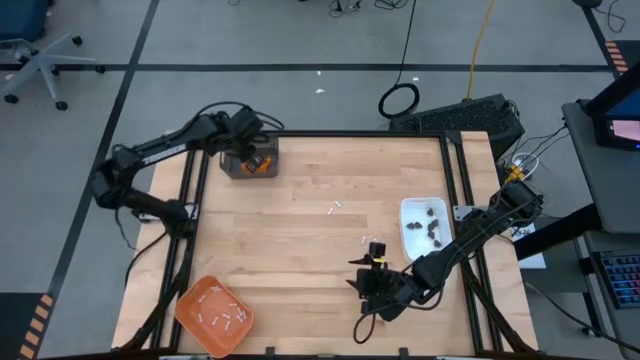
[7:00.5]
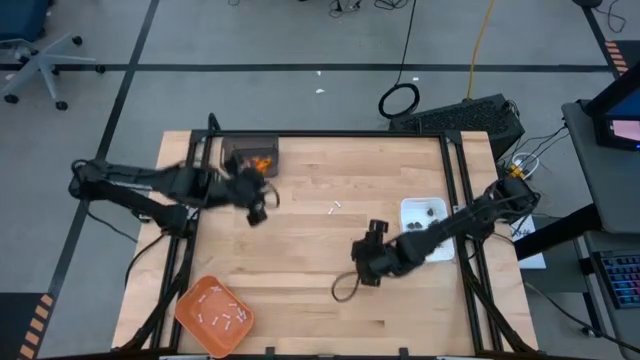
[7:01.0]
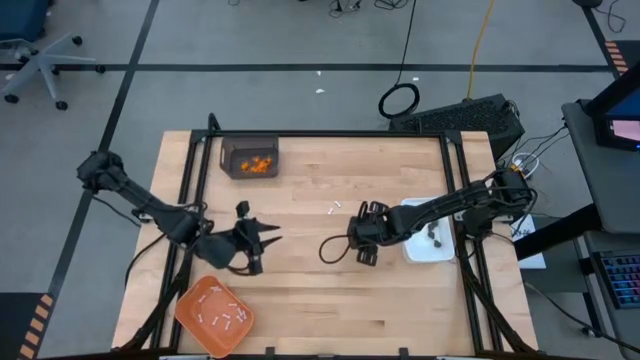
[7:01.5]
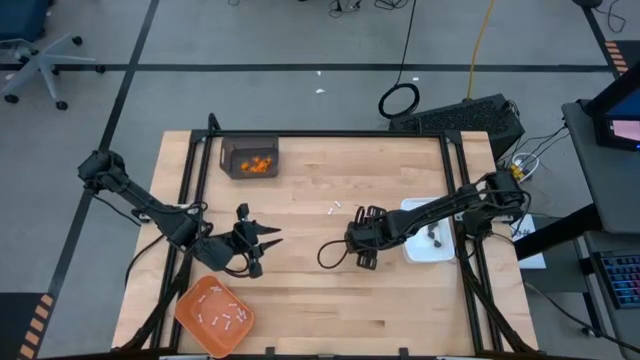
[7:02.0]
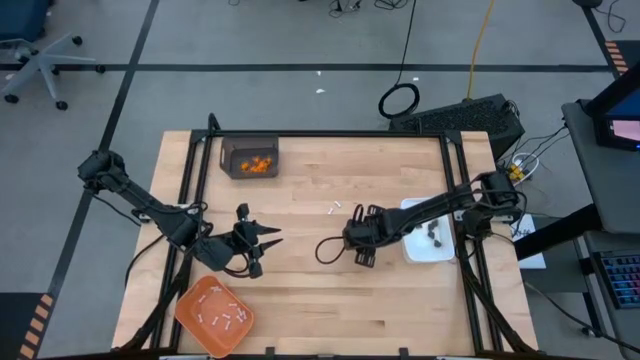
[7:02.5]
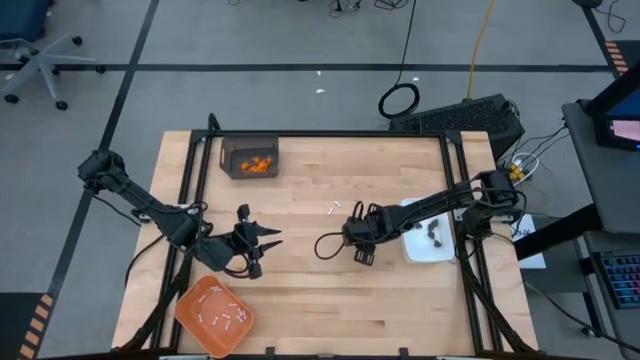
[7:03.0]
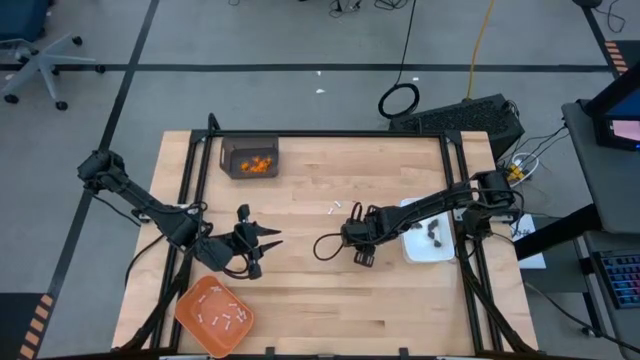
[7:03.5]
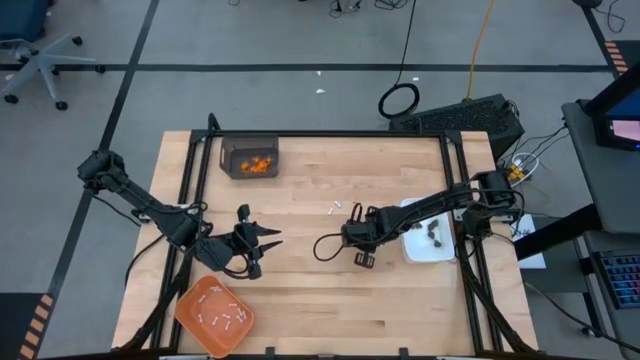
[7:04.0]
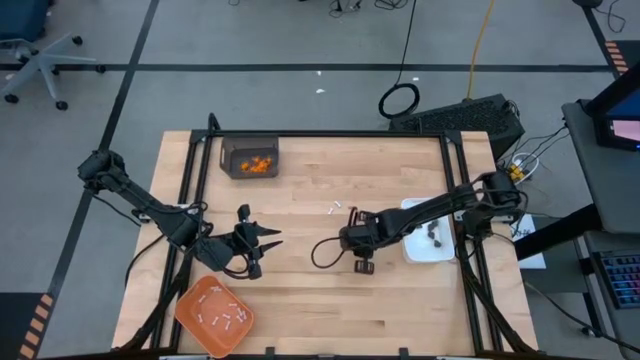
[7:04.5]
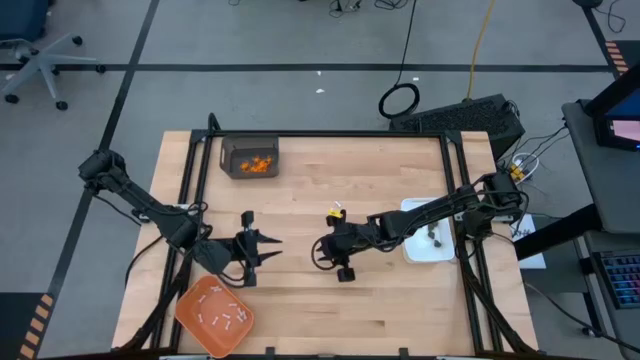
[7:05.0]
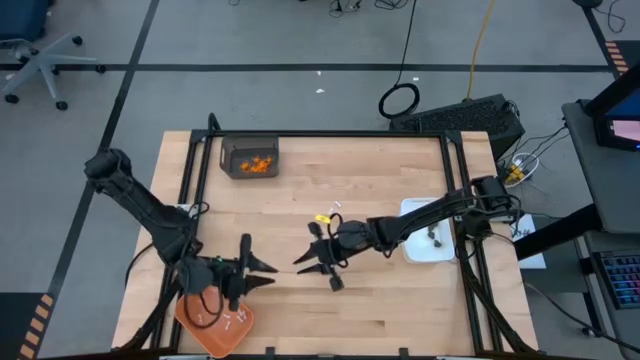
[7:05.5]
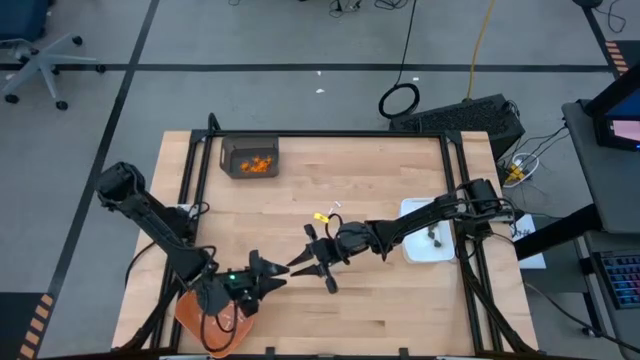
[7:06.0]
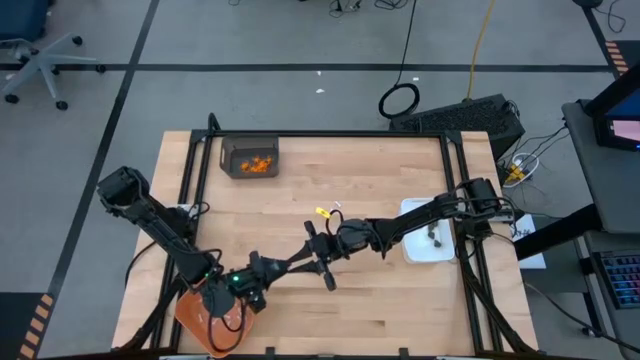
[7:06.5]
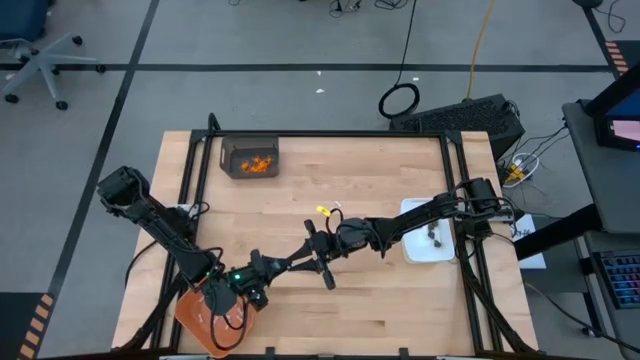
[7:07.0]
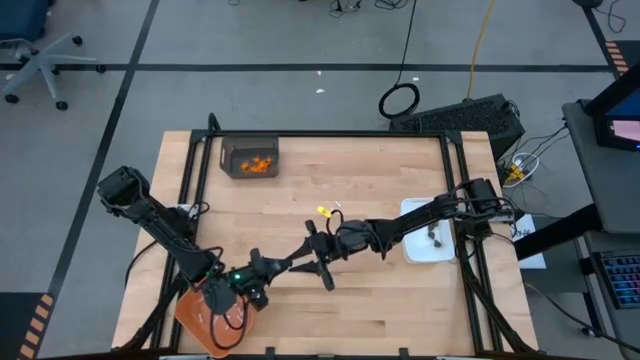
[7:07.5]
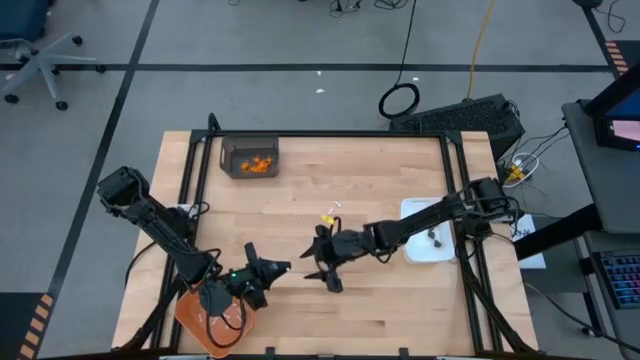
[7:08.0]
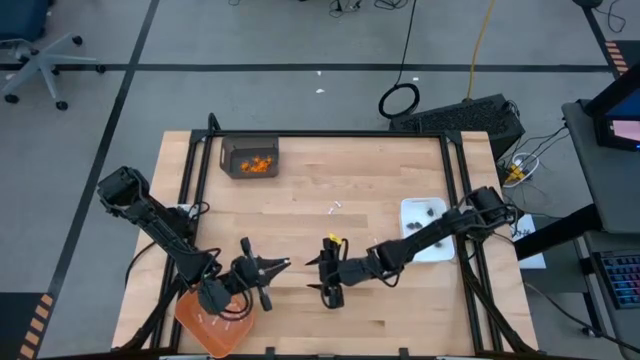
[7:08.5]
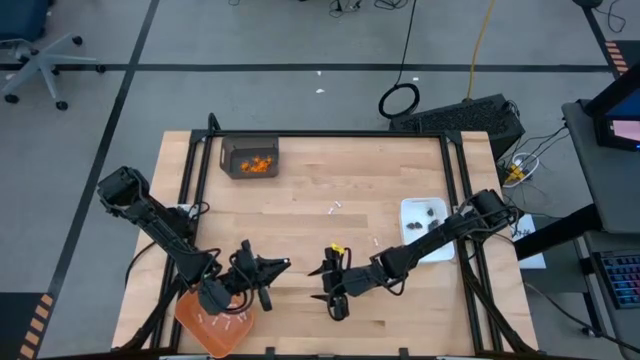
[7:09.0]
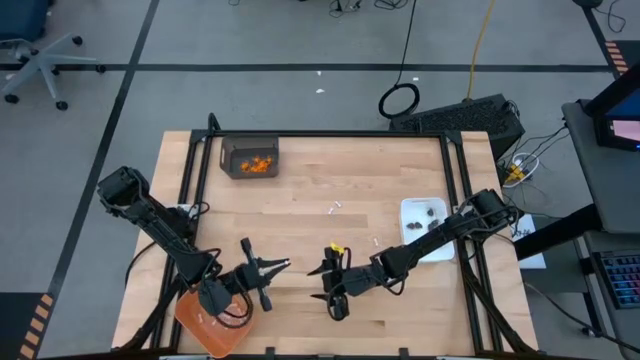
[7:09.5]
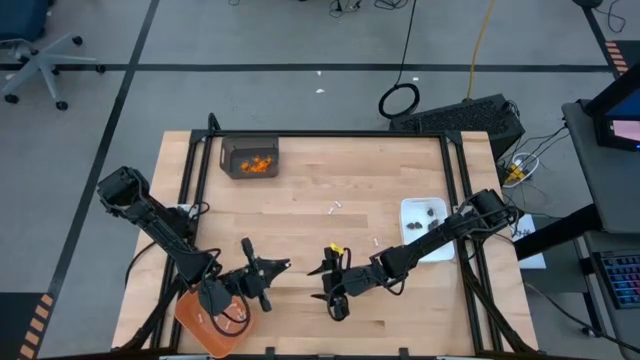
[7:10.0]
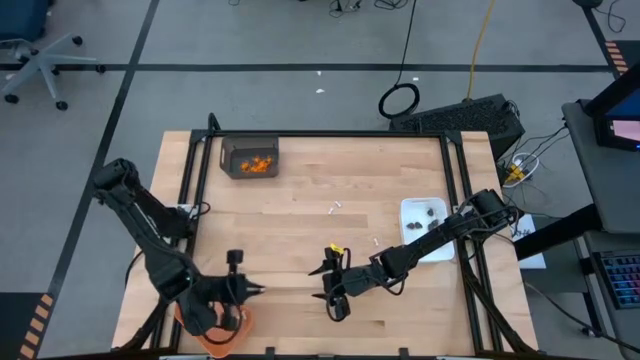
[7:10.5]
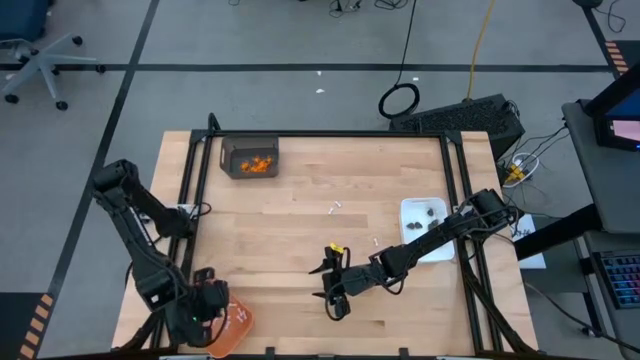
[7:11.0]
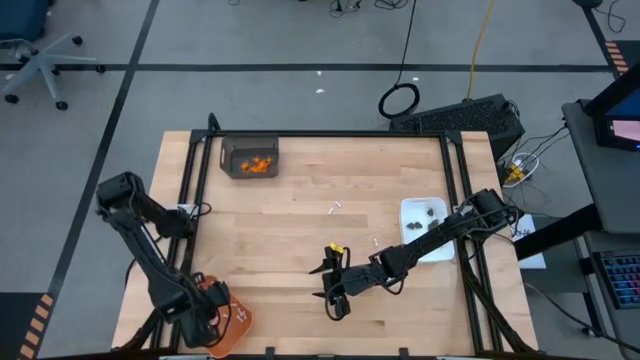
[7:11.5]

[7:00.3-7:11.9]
Task: Sort Halloween decoration
Put the white bone toy into the orange bin

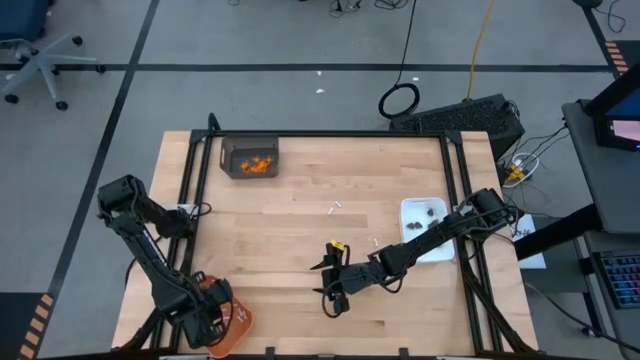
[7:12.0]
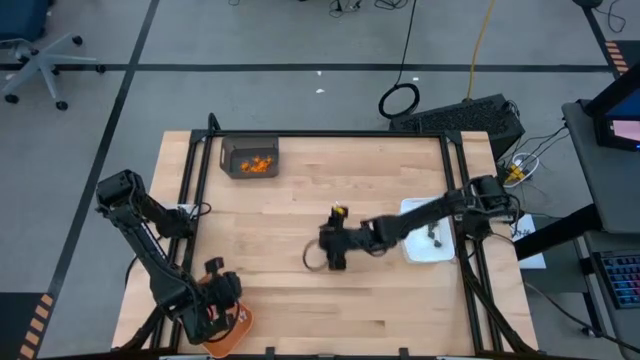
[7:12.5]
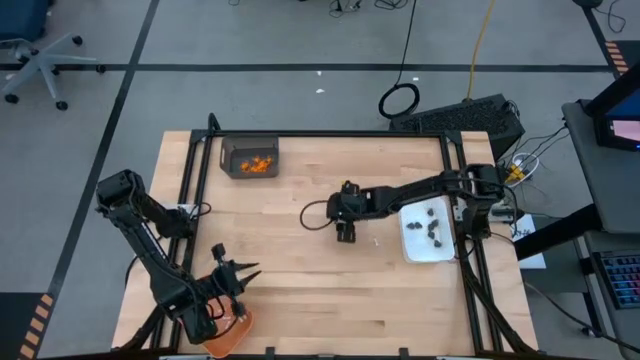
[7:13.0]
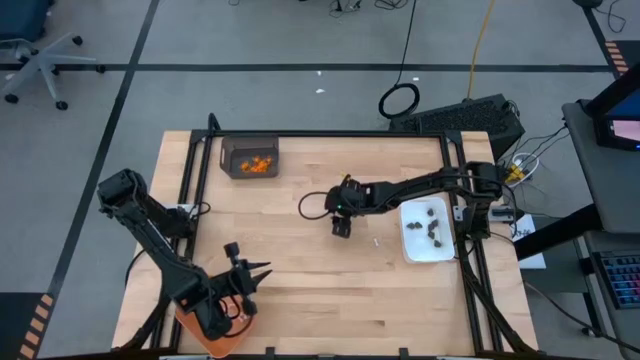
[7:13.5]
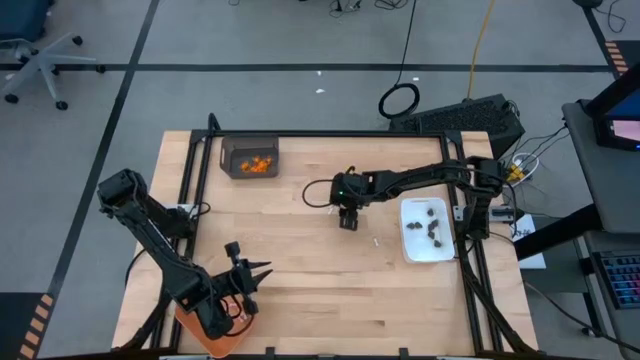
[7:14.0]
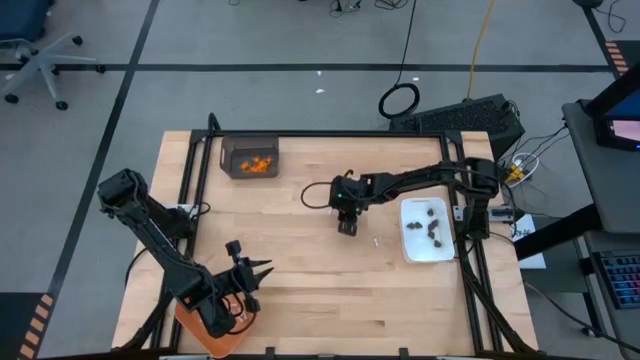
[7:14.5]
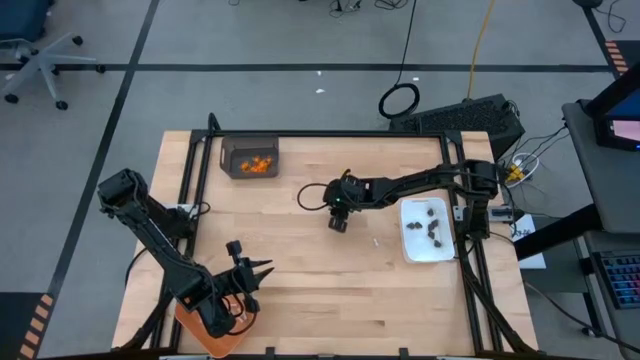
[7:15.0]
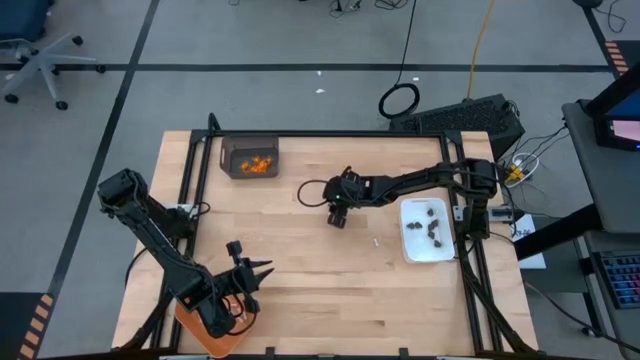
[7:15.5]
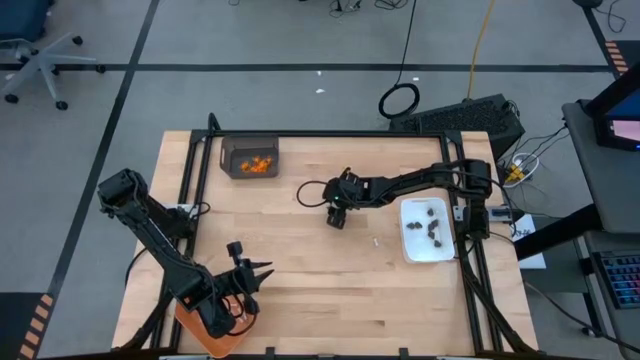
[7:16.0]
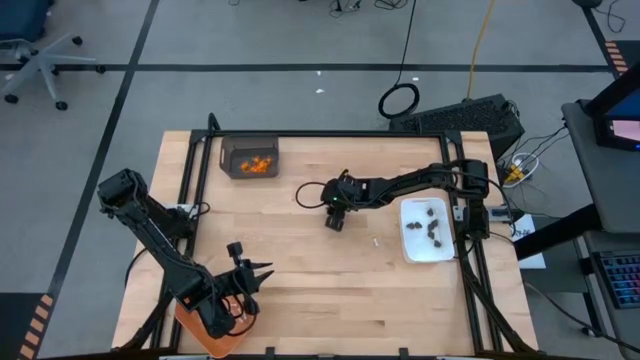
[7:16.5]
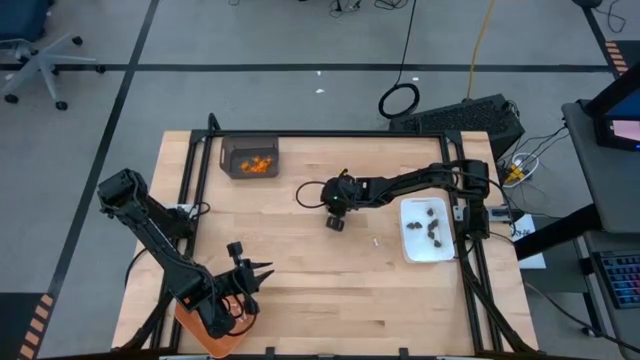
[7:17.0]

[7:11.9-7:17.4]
Put the white bone toy into the orange bin

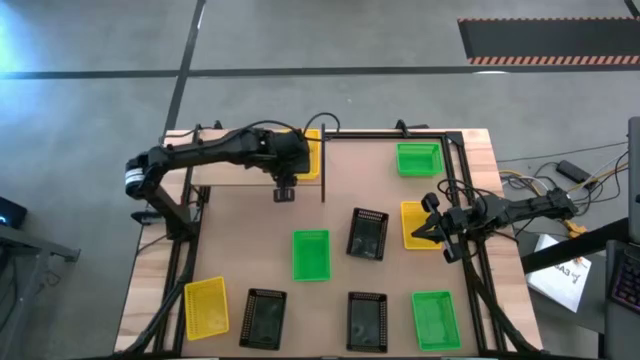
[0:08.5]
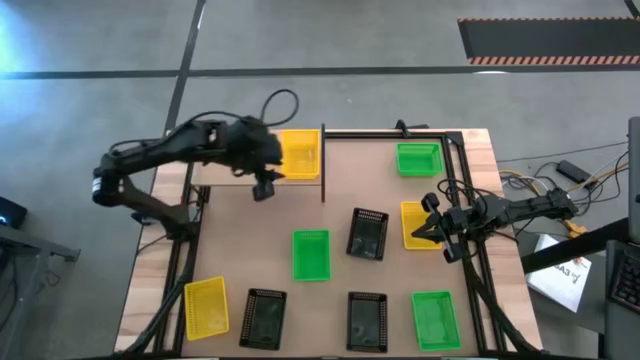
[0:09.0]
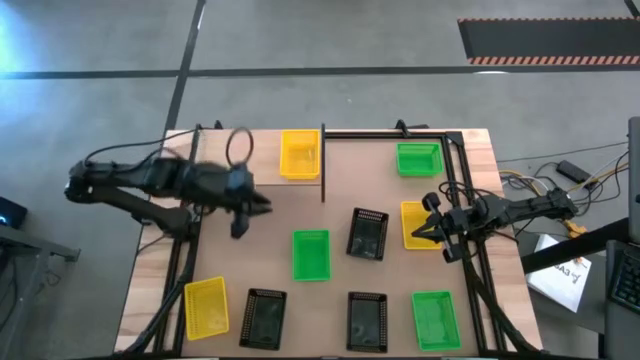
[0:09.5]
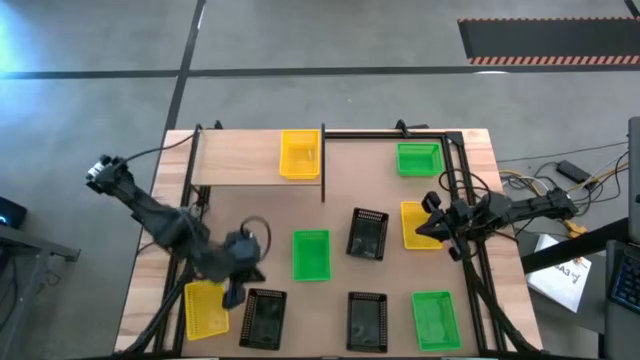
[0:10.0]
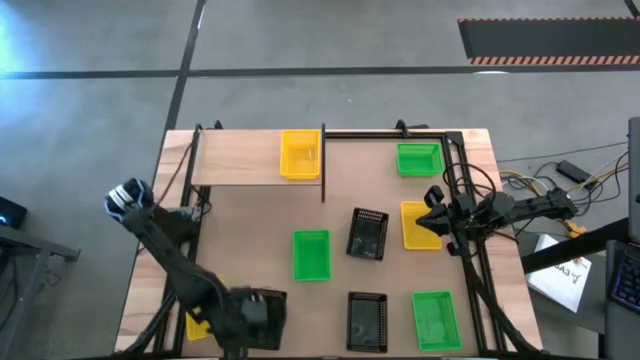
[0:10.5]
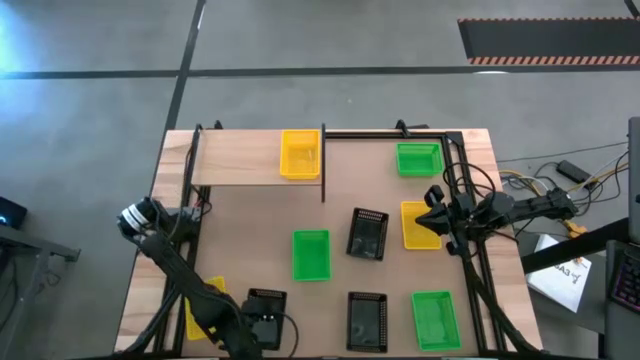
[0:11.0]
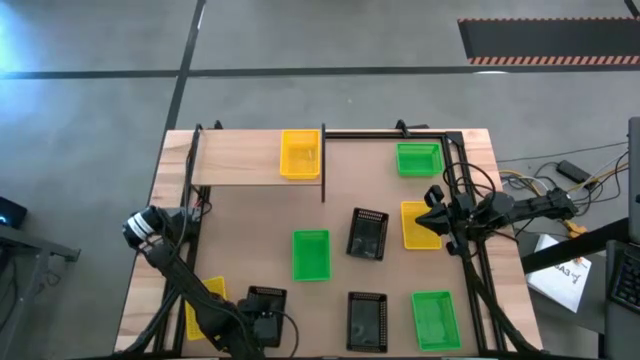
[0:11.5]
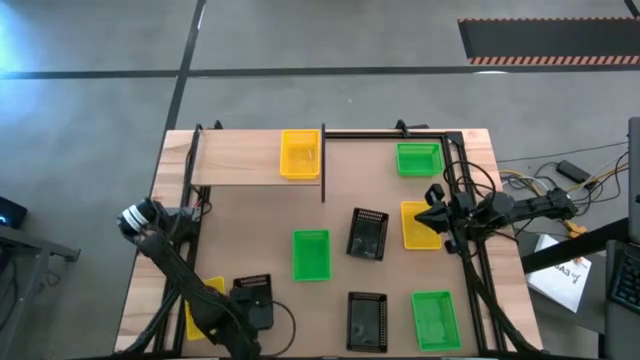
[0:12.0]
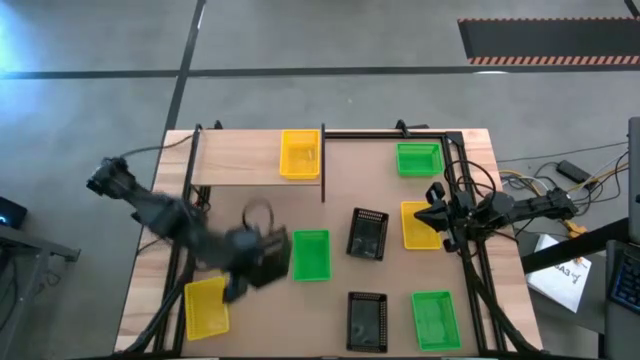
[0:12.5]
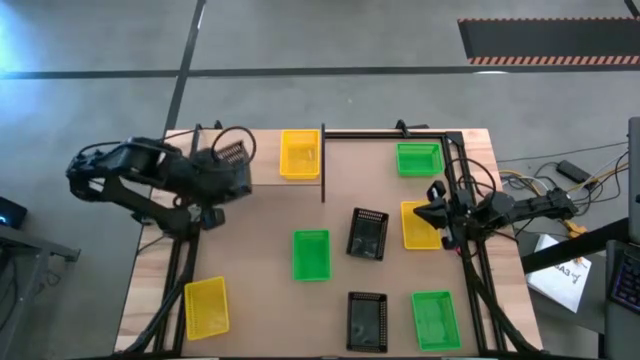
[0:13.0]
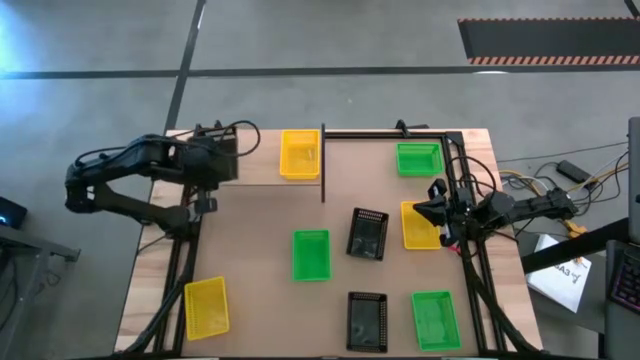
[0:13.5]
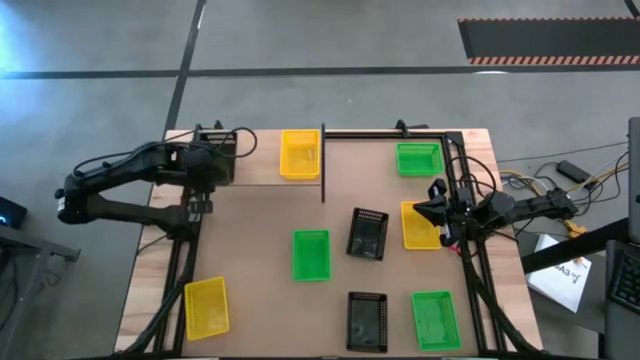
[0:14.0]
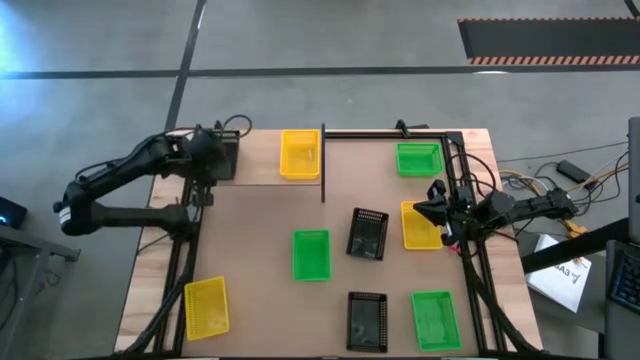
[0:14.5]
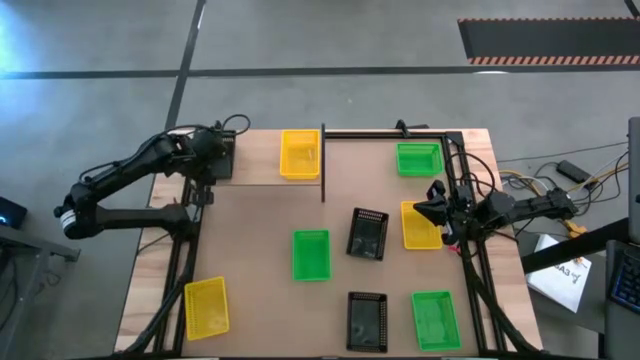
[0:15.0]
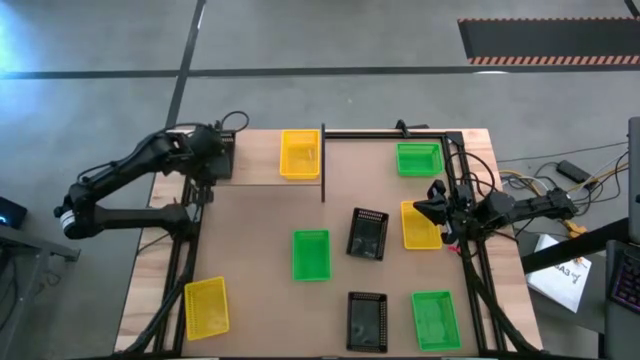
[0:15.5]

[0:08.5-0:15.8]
Task: Stack baskets on shelf by color
Put the bottom left black bin on the shelf
